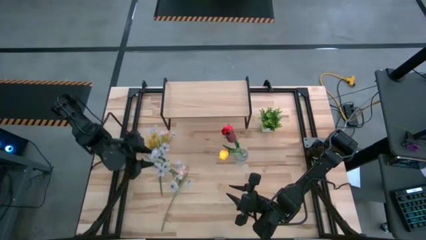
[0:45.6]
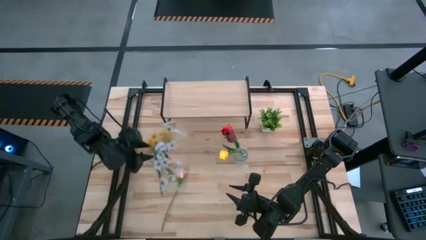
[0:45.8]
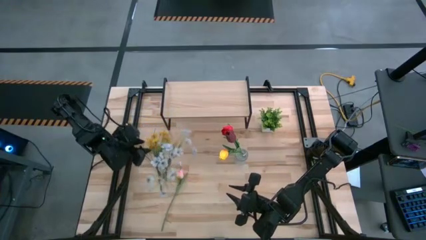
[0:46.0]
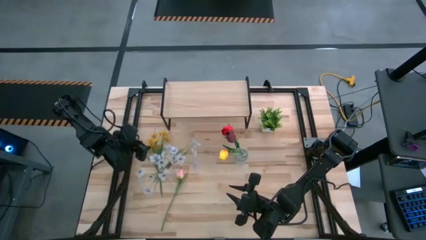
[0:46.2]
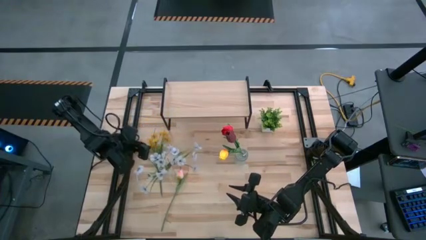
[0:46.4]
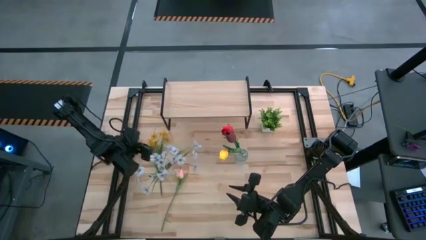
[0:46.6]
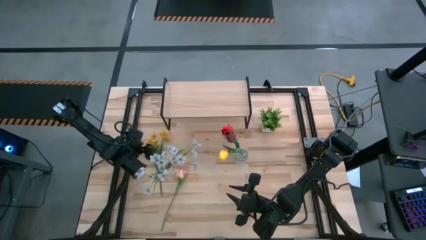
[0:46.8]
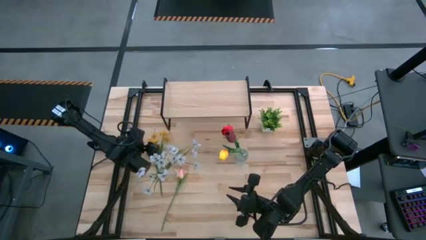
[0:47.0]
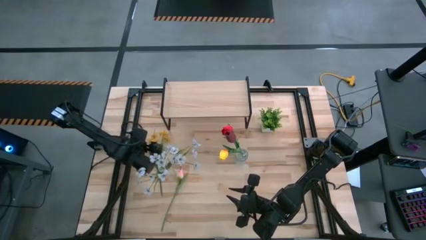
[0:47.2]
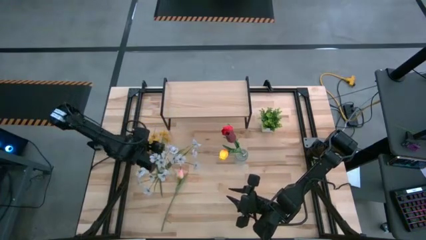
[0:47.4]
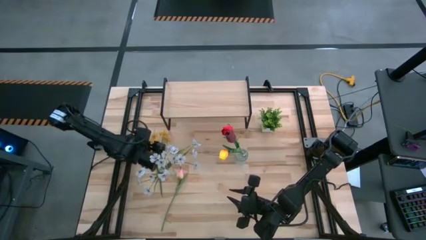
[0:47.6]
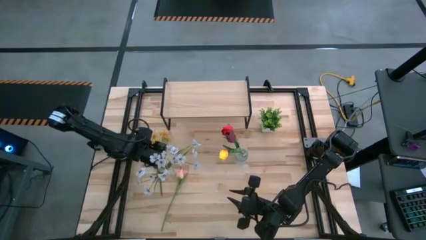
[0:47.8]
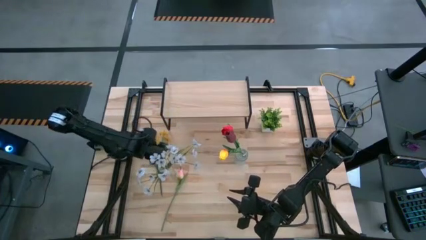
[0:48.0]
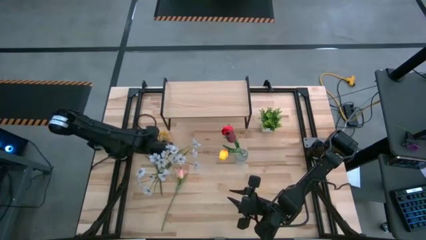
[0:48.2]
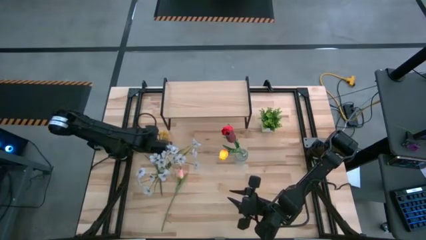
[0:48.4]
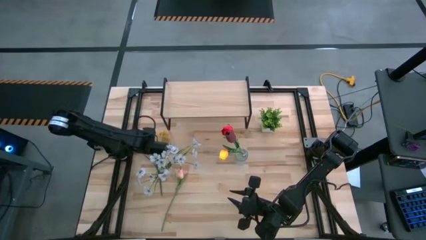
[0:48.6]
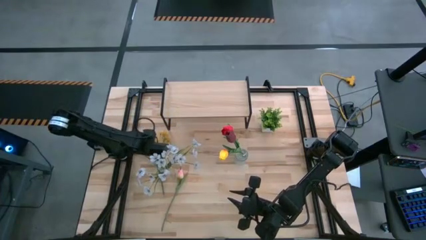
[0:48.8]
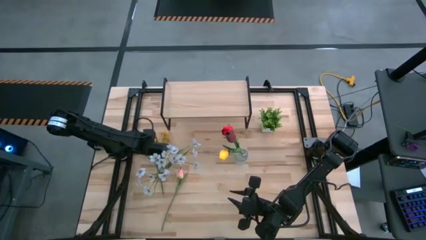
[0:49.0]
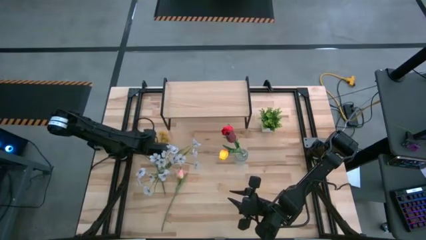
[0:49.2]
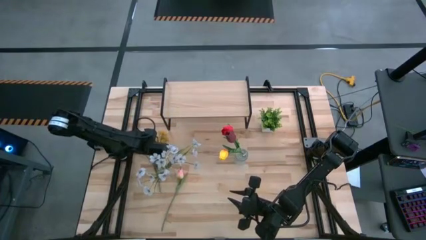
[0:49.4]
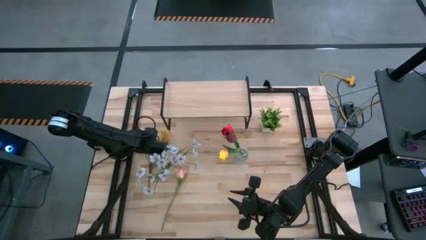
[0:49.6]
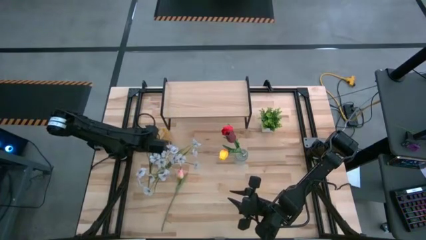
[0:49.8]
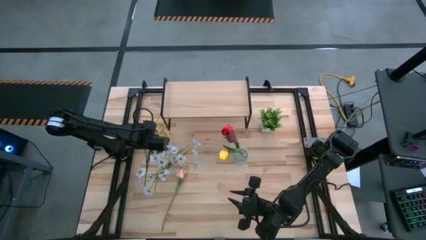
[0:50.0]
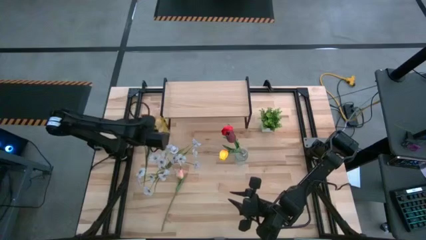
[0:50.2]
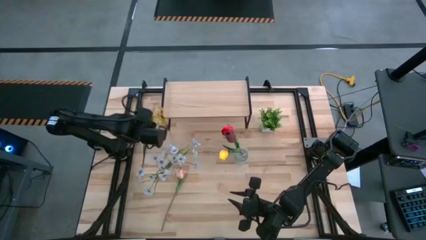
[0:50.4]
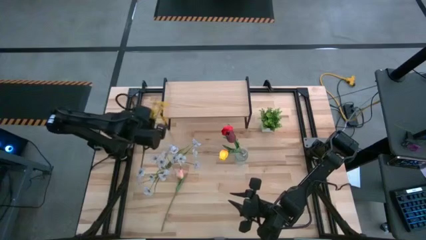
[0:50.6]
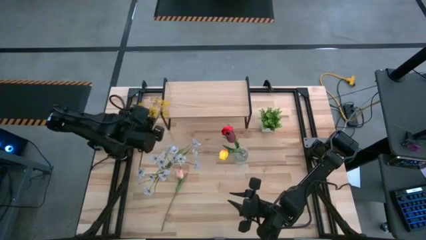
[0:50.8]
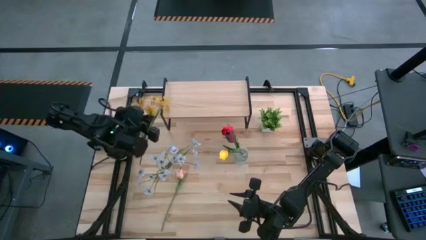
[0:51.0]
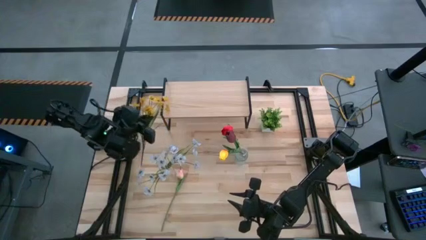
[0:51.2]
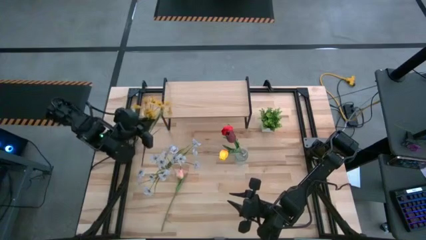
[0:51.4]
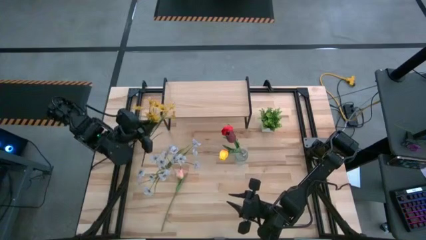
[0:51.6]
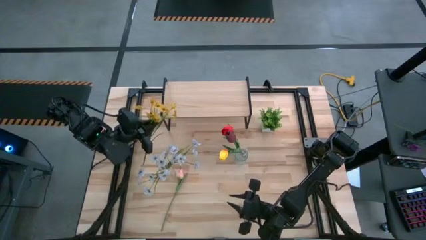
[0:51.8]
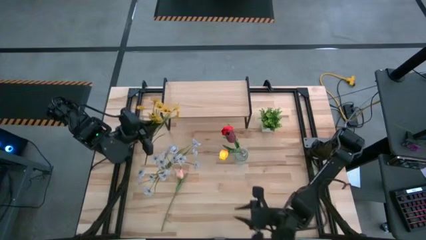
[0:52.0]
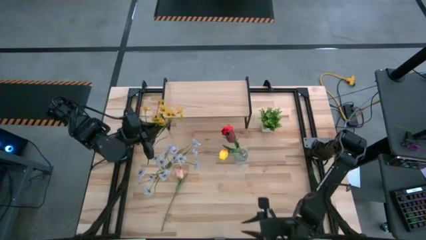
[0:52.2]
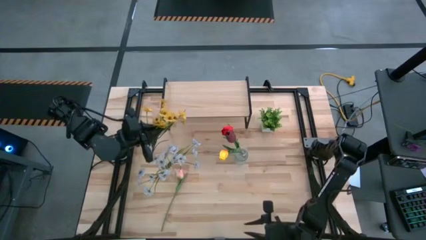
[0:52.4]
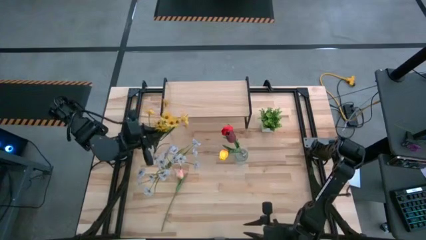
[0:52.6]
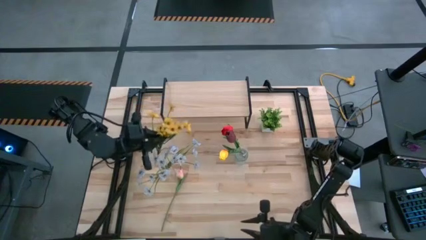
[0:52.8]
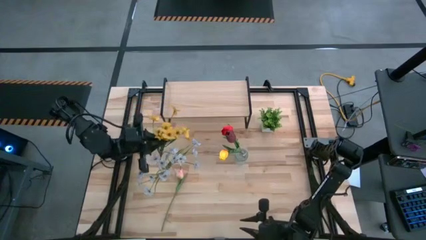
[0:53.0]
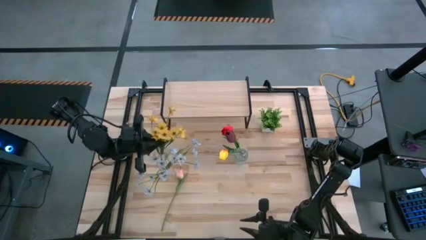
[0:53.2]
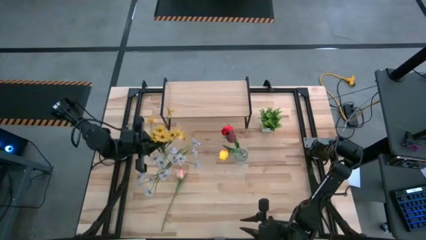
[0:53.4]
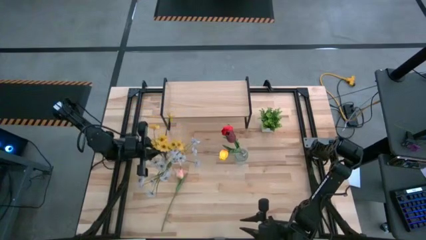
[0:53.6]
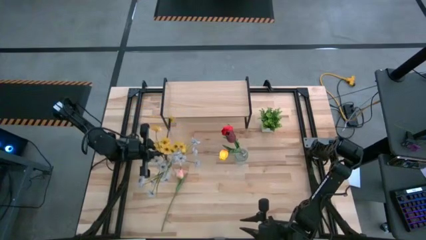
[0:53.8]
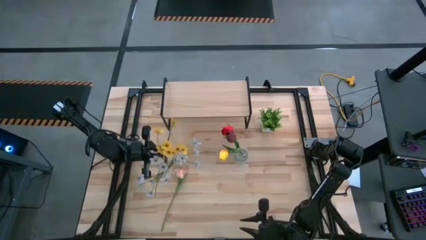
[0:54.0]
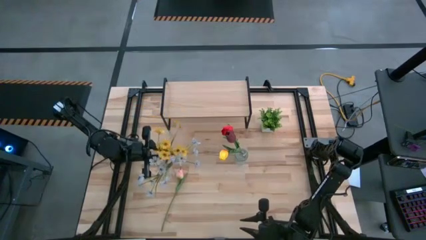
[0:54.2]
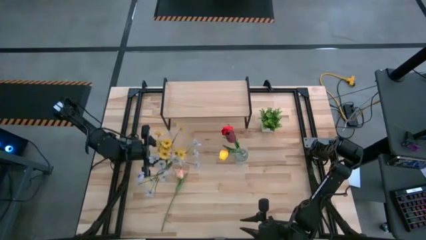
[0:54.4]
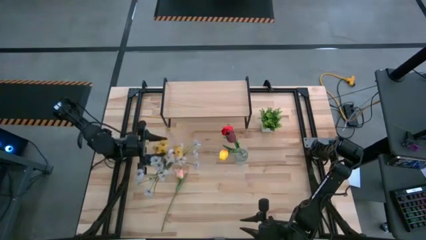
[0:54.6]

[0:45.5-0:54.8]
Task: Pick and place flowers into a vace then onto a shelf
Put the yellow flowers into the bottom transparent vase

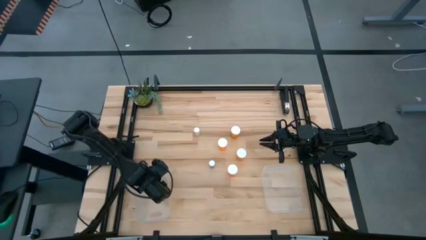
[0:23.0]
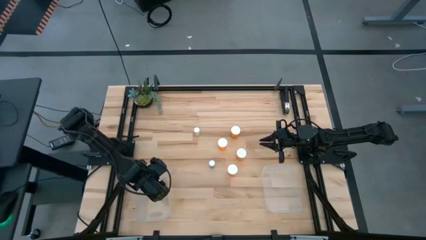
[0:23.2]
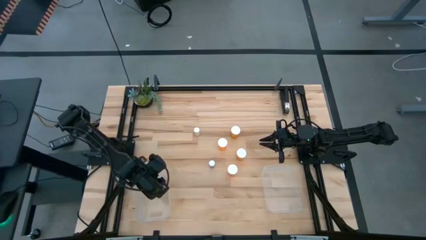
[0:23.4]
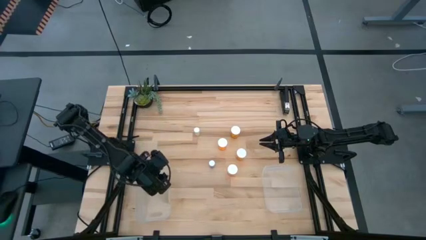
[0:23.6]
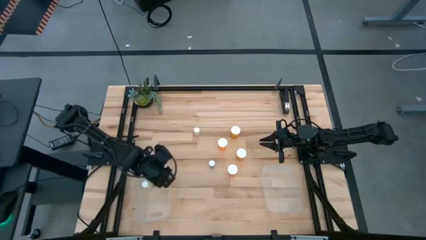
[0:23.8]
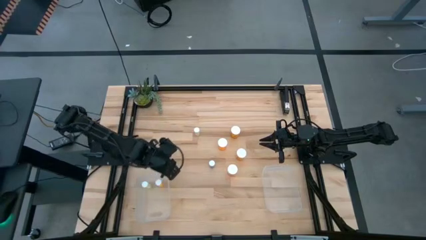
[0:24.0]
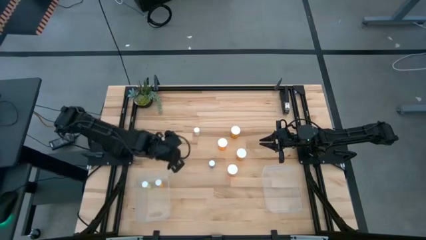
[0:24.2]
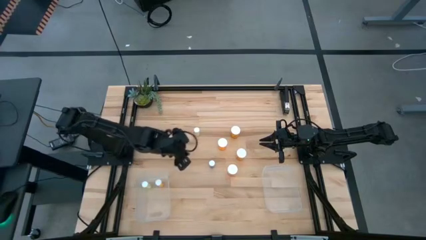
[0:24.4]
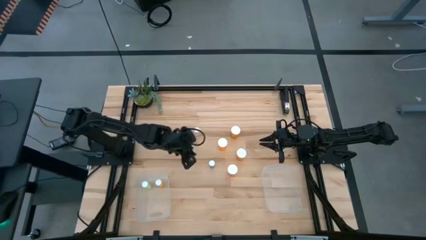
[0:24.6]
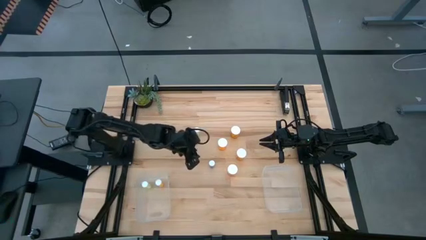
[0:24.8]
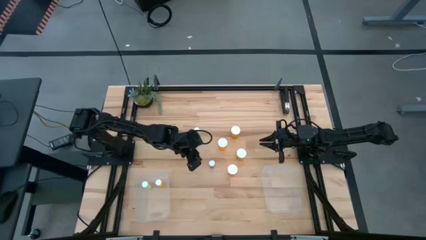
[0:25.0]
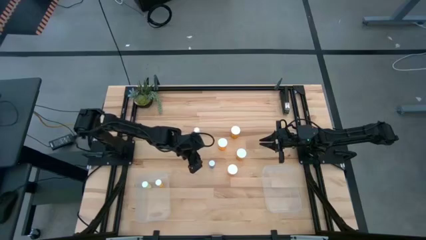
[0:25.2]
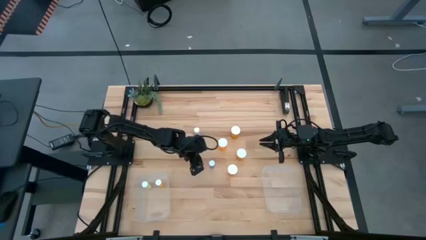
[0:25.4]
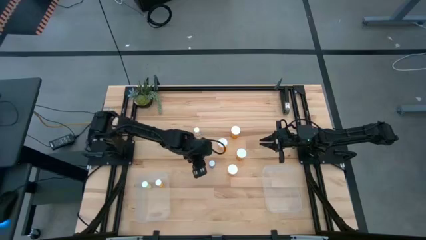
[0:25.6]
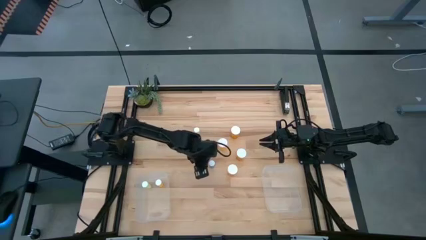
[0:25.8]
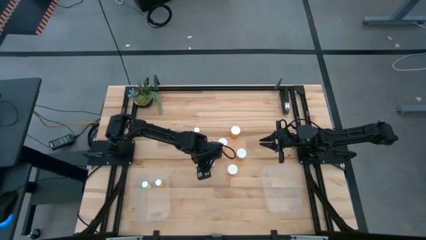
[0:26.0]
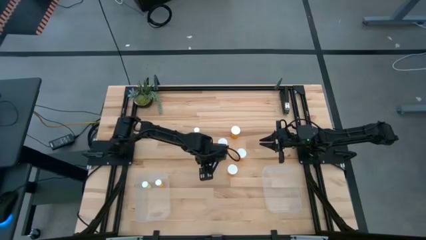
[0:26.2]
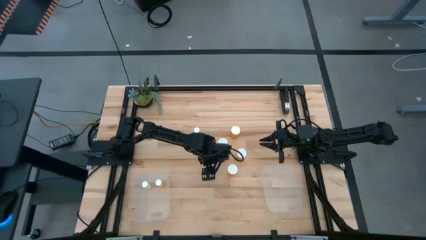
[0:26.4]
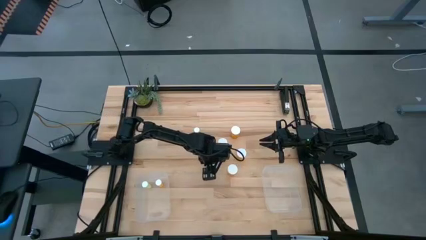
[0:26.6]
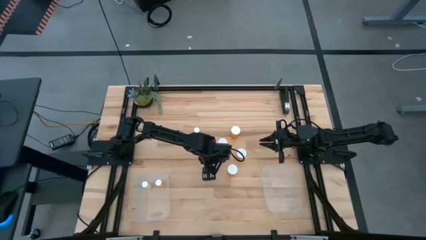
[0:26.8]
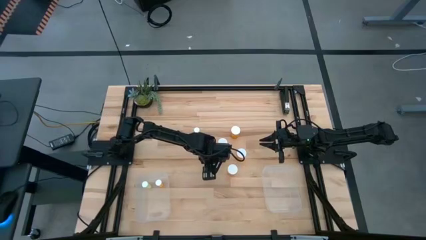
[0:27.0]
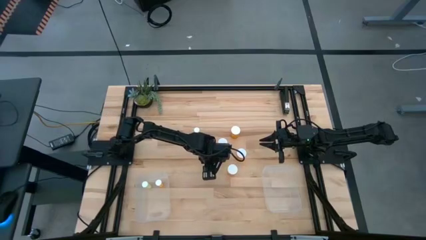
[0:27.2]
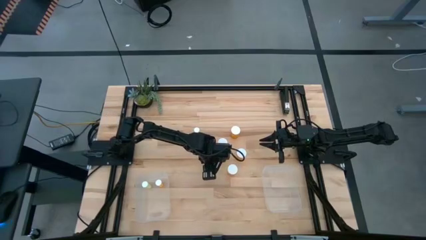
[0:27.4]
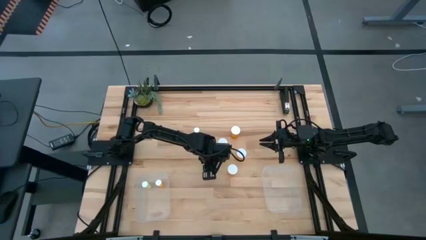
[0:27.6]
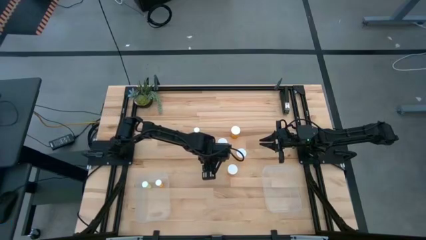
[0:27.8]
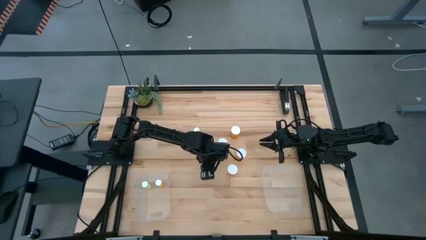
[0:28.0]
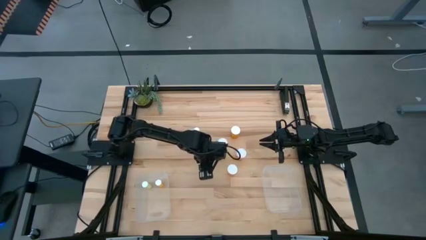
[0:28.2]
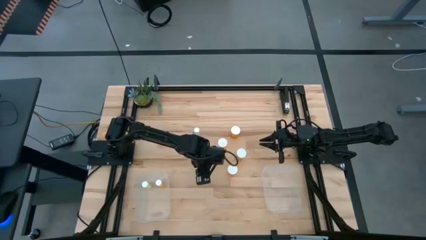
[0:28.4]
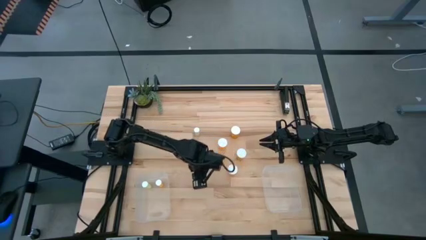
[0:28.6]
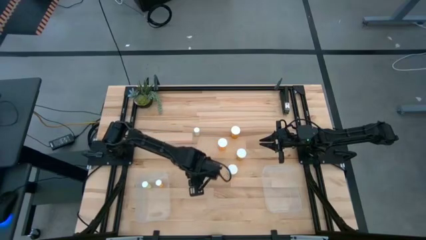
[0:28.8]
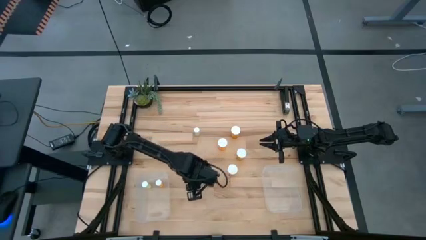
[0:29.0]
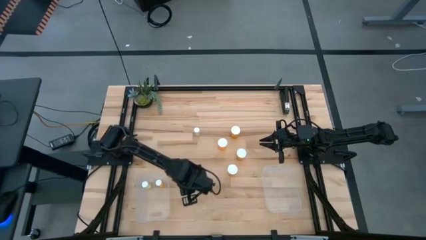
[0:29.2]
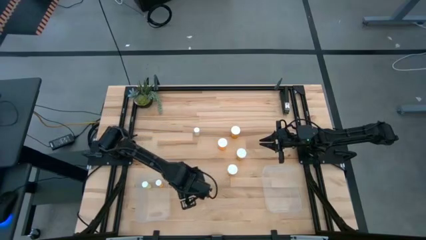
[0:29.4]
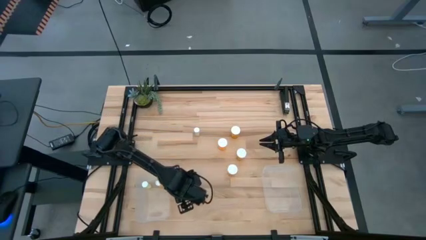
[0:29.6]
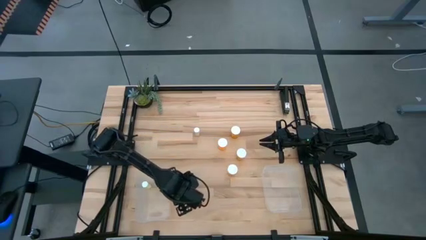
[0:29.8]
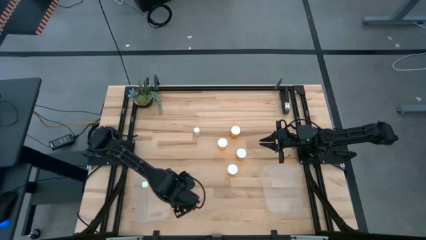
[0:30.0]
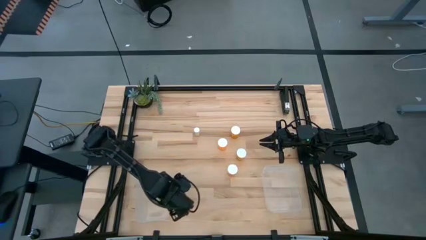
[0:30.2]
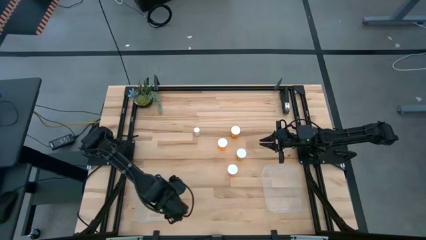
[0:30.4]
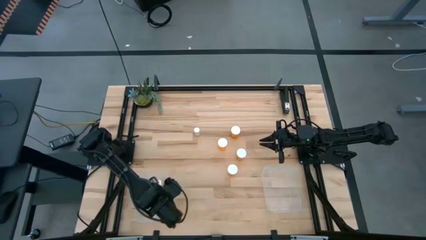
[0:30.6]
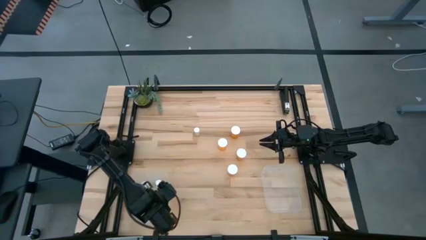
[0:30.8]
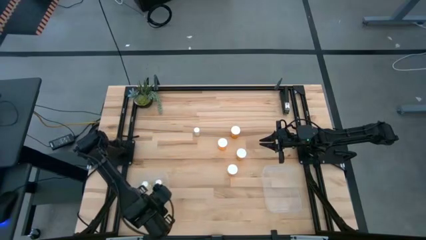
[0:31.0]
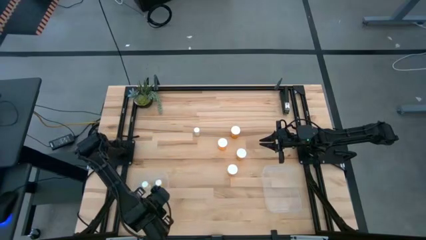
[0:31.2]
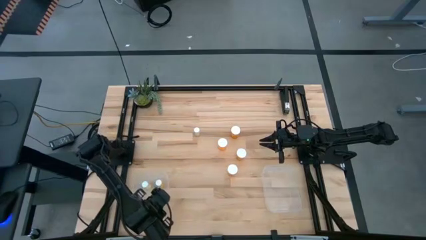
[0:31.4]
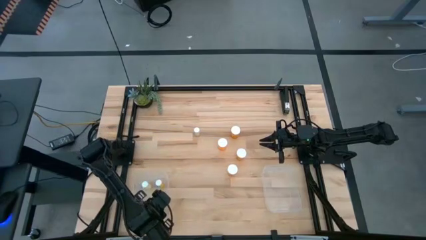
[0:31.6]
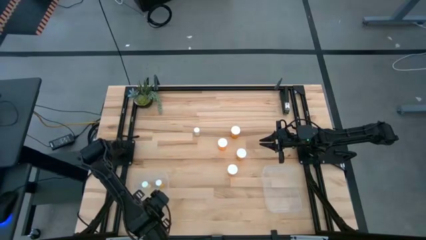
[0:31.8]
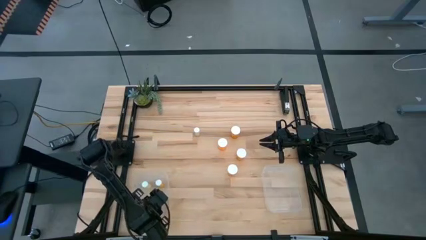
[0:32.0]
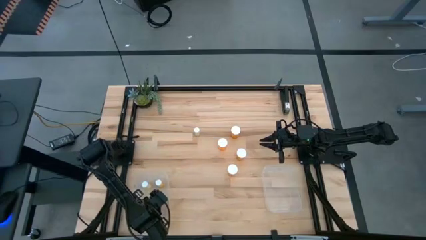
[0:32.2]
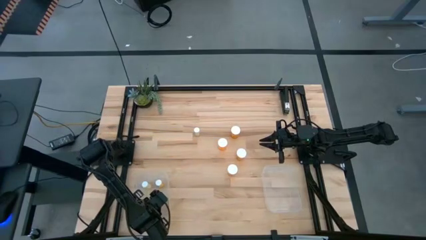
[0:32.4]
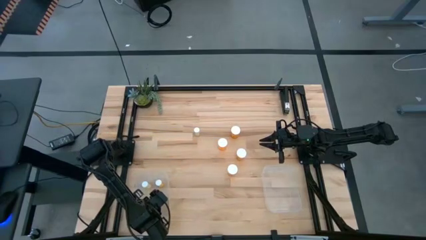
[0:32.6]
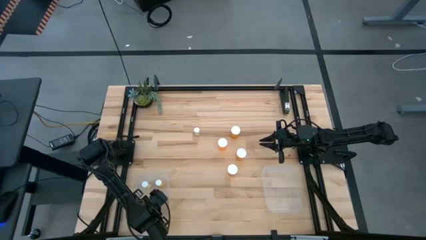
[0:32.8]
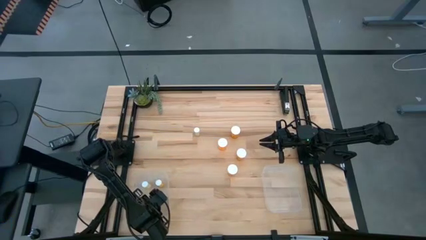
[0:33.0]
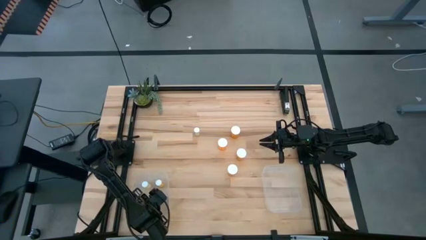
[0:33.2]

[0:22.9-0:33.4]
Task: Pick and place medicine bottles into bin by pill shape (circle, oval)
Put the small blue pill bottle into the left transparent bin
